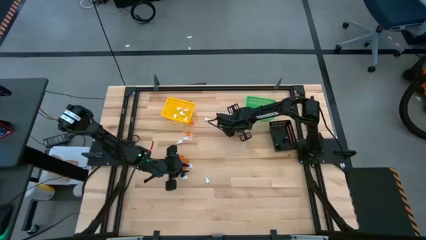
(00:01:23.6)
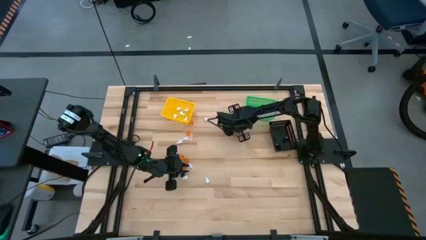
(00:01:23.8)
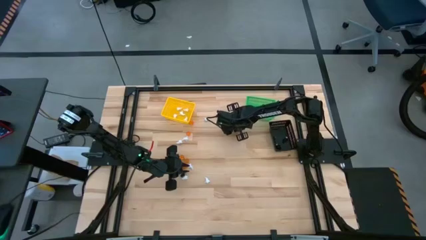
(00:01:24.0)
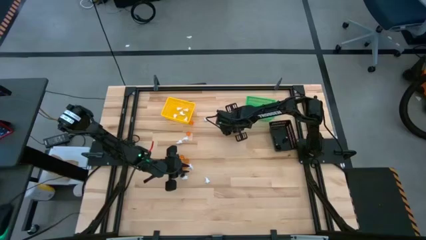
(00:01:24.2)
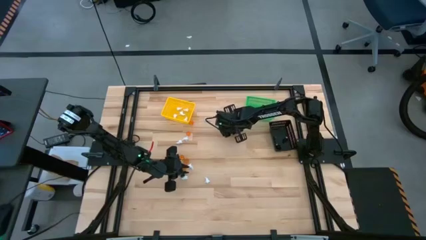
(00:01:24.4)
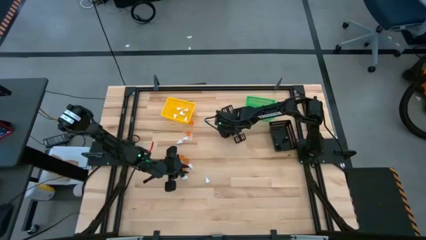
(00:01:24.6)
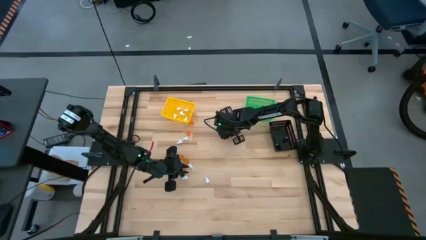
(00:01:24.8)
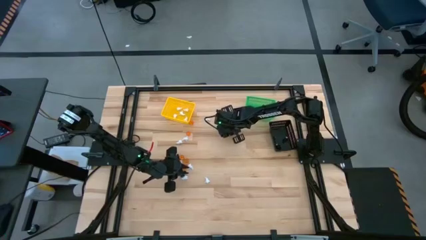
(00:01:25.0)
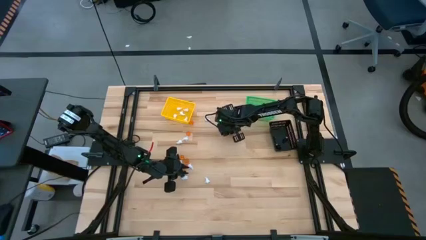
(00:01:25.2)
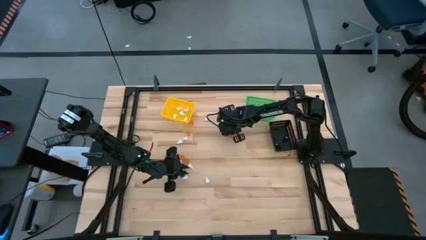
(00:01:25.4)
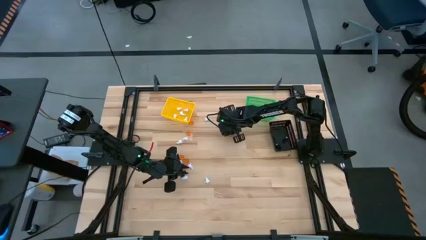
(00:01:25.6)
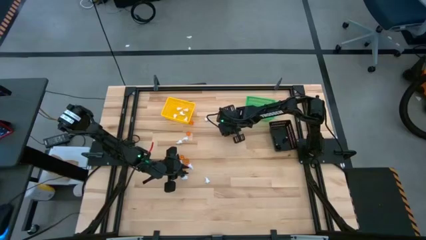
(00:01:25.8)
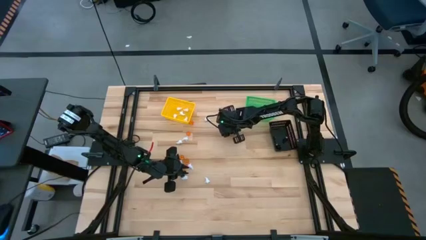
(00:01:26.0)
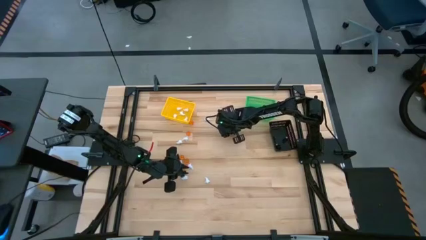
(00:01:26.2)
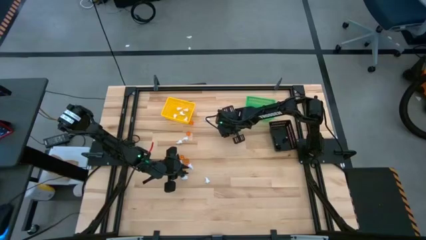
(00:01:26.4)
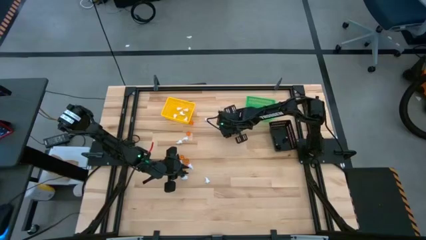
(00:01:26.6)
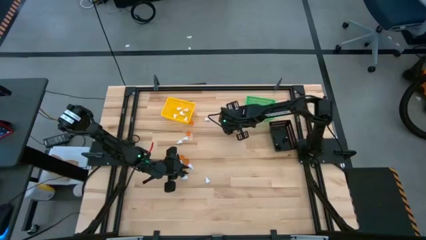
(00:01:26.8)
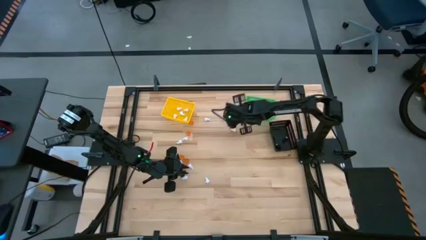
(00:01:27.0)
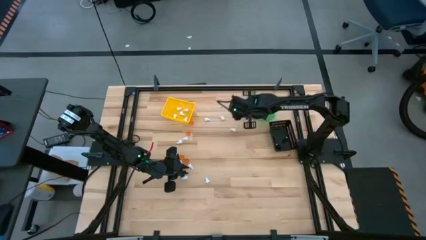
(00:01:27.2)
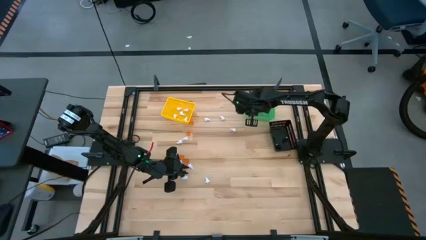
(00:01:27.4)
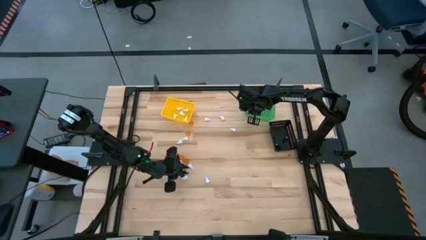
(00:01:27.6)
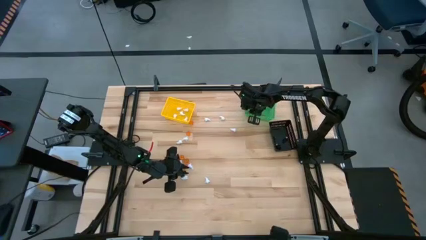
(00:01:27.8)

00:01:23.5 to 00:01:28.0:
Task: Sort Halloween decoration
Put the orange pumpkin toy into the green bin

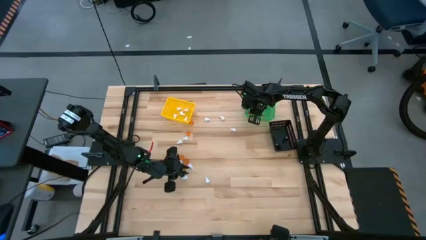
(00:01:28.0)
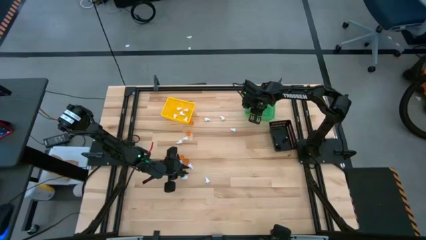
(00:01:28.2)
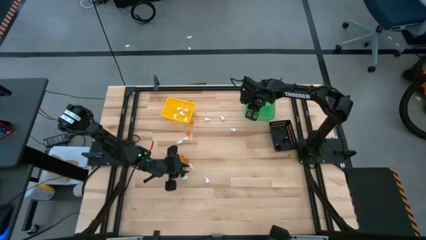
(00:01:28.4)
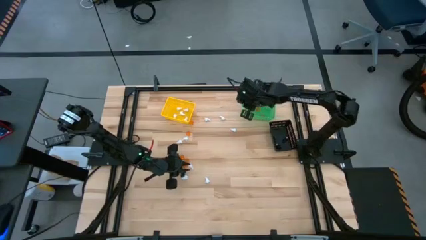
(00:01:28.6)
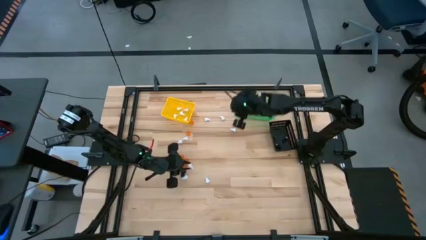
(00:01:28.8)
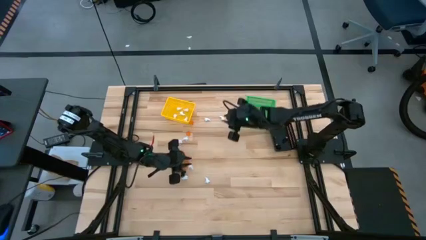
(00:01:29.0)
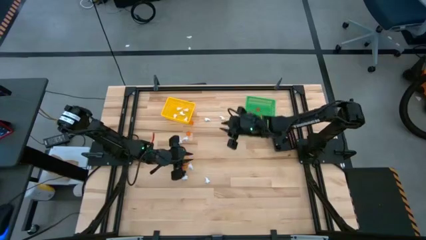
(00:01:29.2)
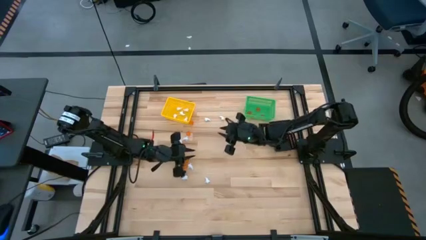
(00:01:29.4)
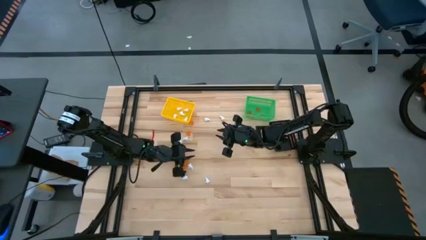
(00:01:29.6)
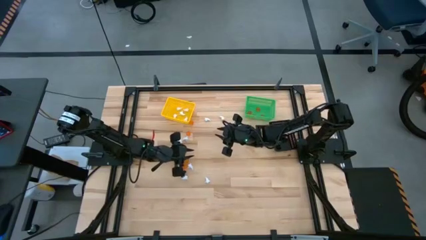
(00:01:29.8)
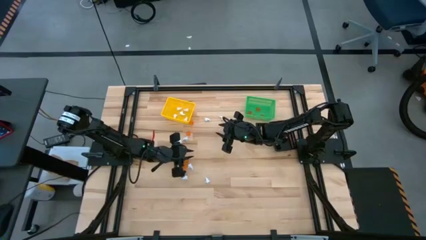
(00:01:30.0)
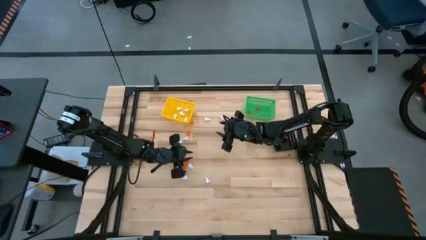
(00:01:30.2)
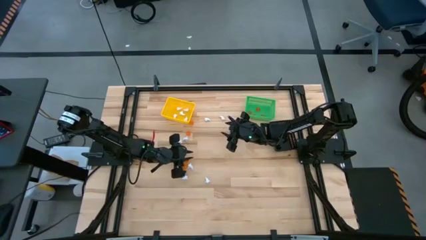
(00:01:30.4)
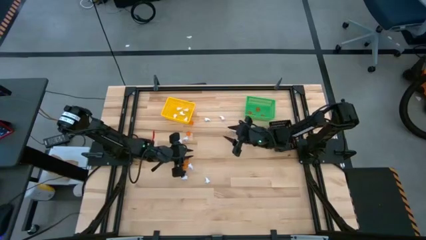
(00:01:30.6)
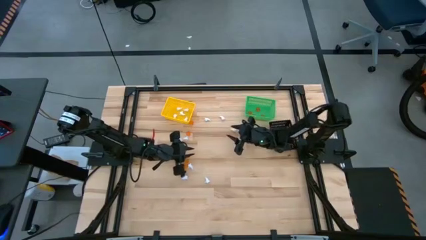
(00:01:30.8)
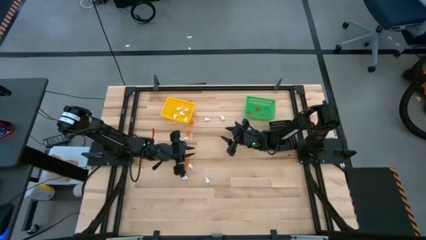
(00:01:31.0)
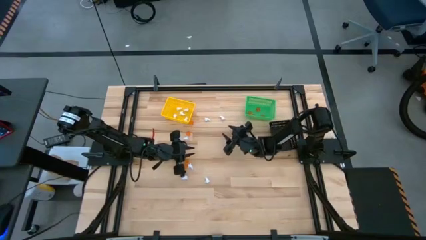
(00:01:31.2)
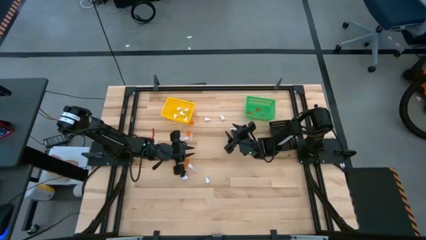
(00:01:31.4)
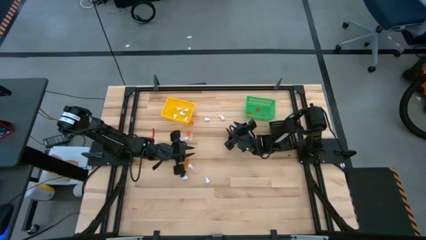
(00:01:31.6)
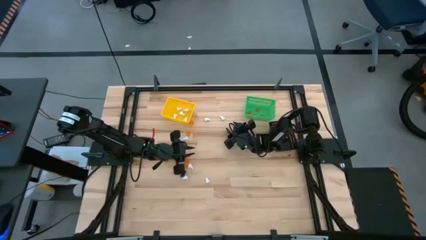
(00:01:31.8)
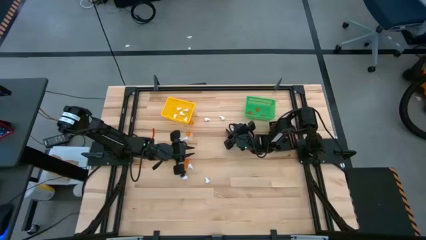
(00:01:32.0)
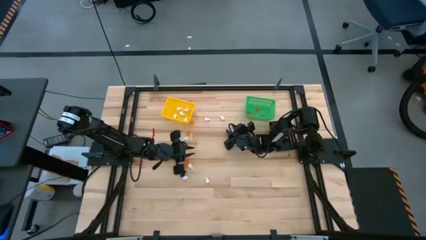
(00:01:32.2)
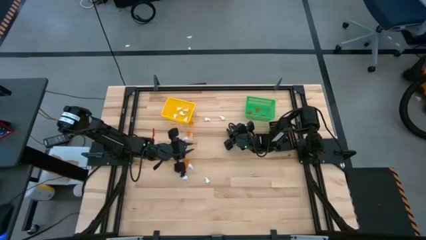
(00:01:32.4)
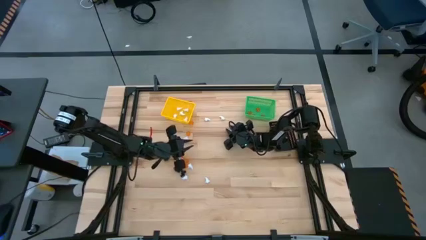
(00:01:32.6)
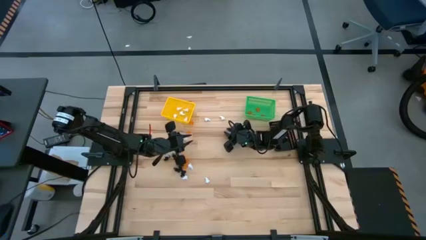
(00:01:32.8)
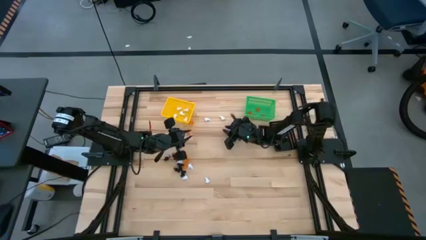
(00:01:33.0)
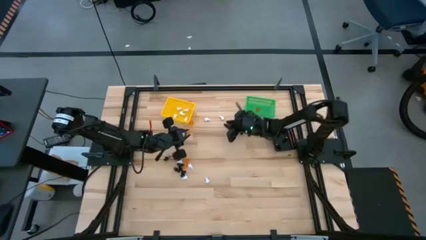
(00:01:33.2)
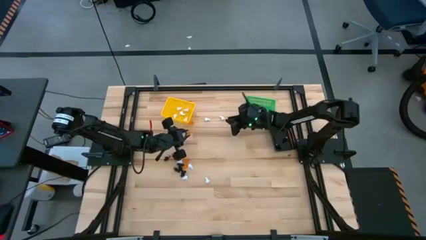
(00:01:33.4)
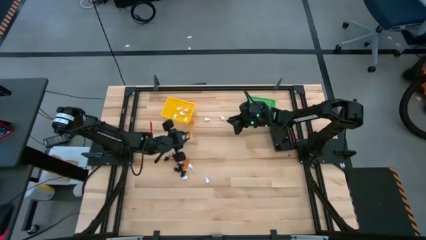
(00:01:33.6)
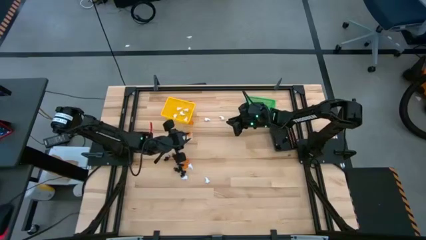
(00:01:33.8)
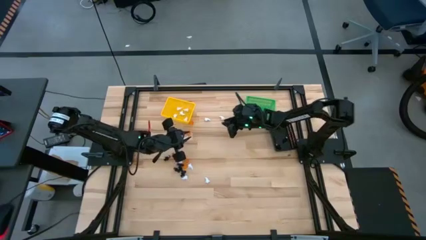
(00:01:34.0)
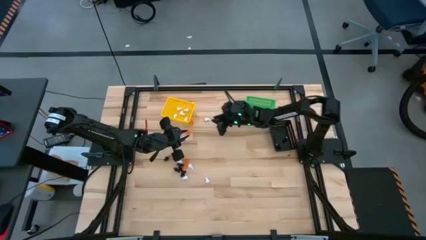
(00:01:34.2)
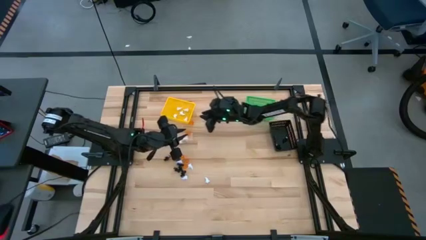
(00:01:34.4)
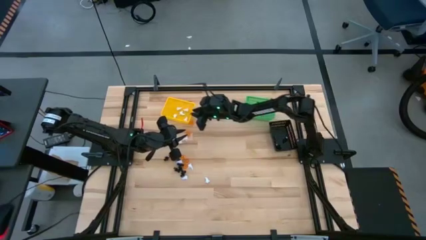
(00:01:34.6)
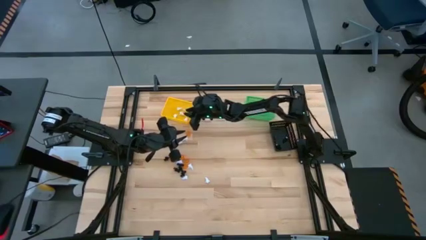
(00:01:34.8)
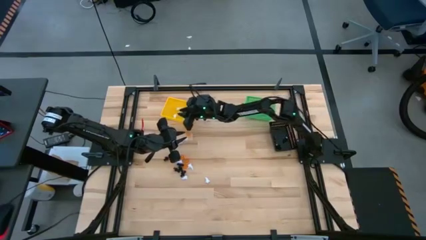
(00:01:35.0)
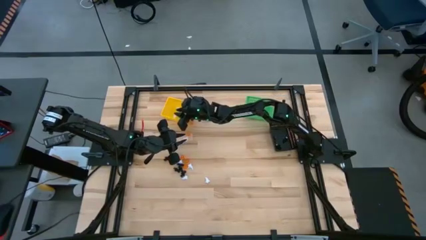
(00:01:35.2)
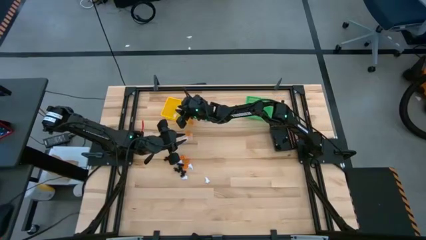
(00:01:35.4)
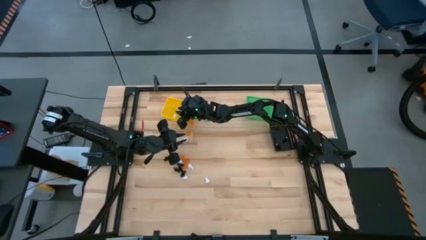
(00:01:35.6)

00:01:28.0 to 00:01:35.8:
Put the white ghost toy into the yellow bin

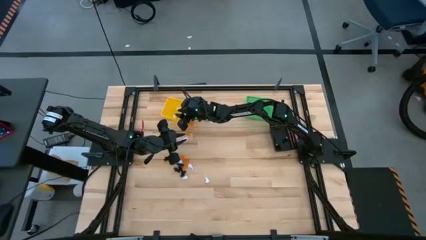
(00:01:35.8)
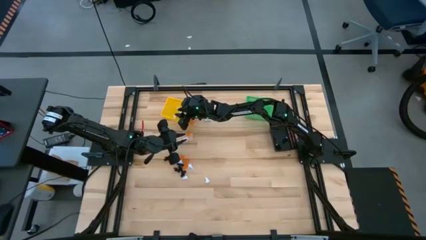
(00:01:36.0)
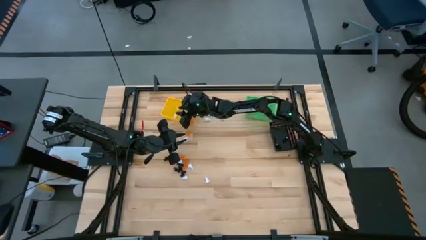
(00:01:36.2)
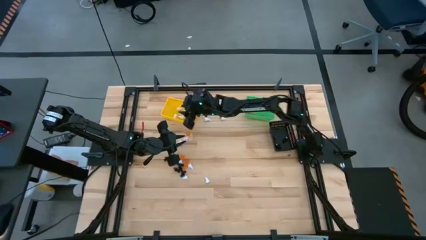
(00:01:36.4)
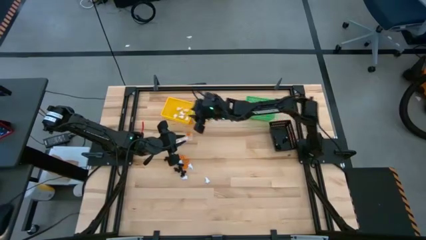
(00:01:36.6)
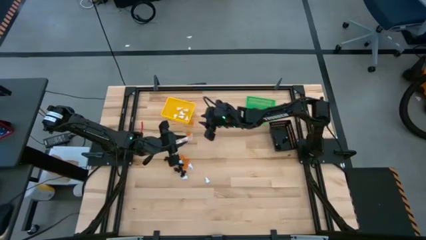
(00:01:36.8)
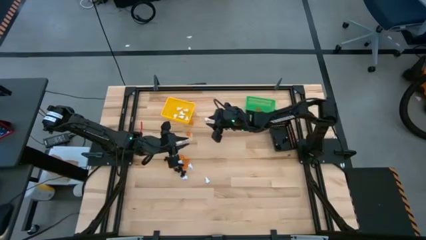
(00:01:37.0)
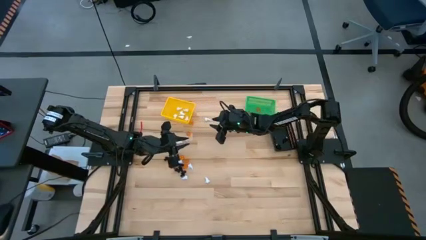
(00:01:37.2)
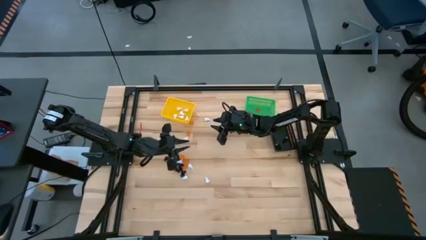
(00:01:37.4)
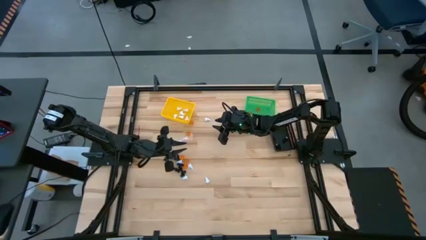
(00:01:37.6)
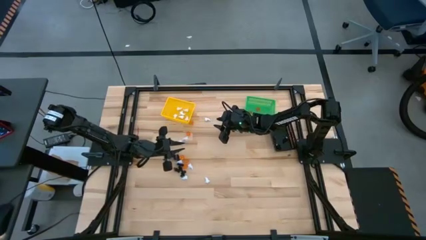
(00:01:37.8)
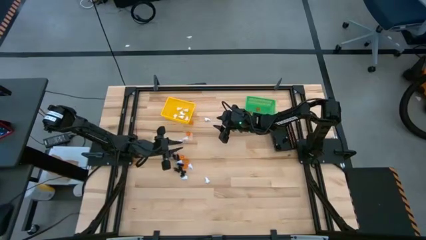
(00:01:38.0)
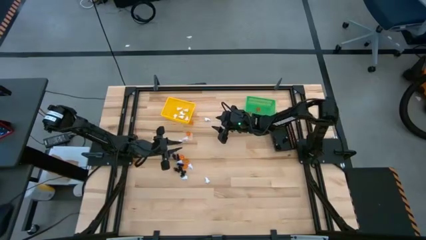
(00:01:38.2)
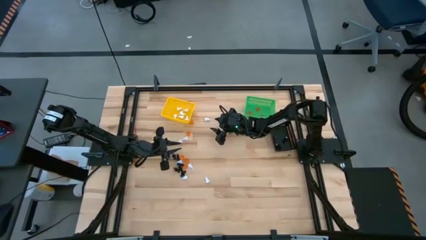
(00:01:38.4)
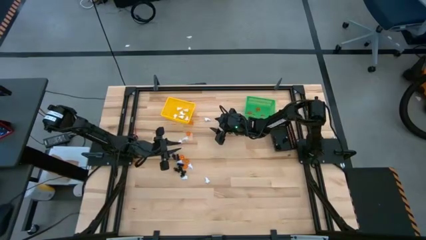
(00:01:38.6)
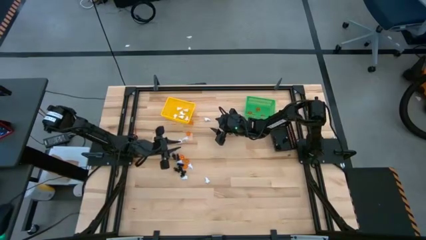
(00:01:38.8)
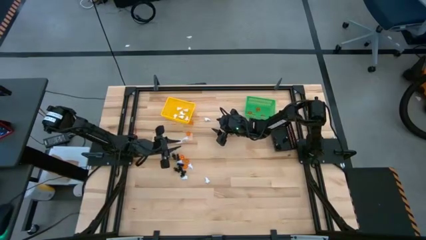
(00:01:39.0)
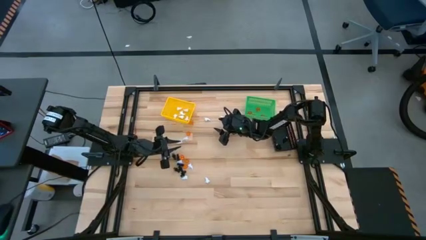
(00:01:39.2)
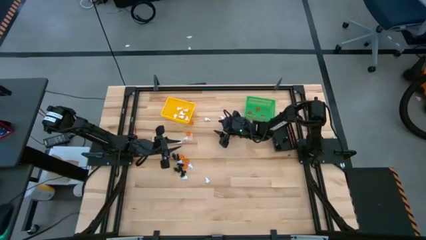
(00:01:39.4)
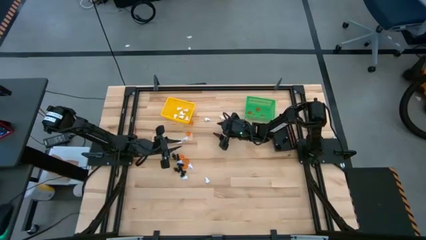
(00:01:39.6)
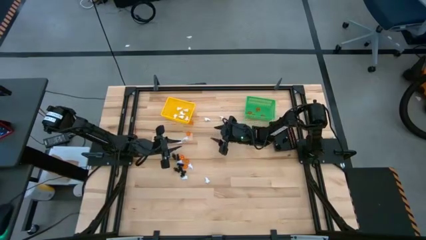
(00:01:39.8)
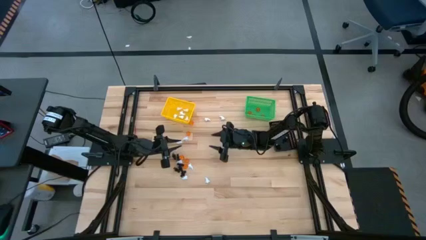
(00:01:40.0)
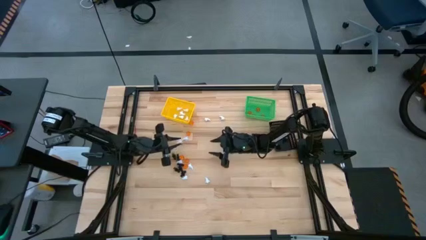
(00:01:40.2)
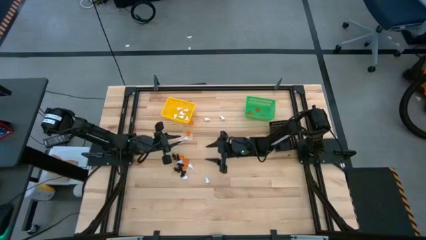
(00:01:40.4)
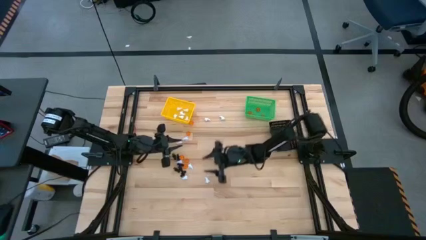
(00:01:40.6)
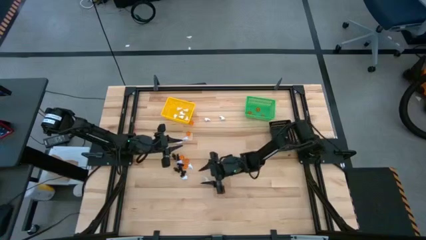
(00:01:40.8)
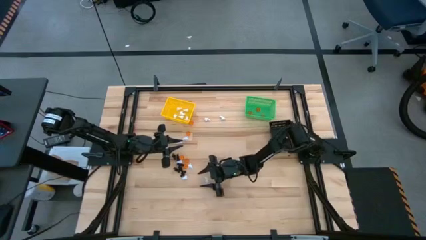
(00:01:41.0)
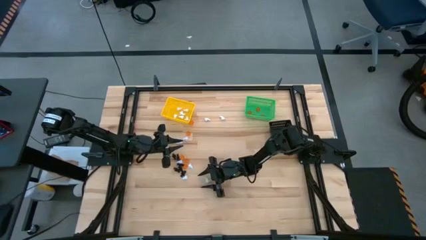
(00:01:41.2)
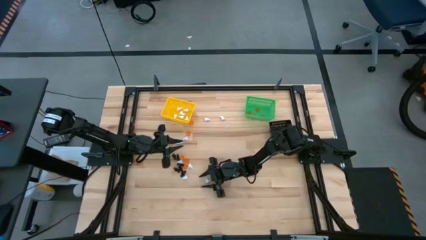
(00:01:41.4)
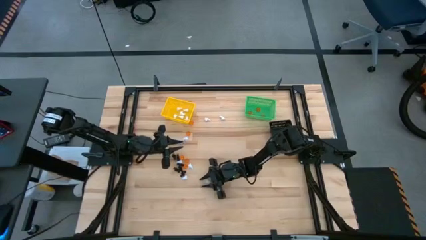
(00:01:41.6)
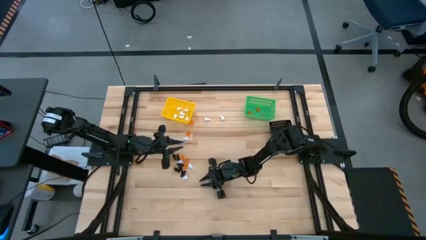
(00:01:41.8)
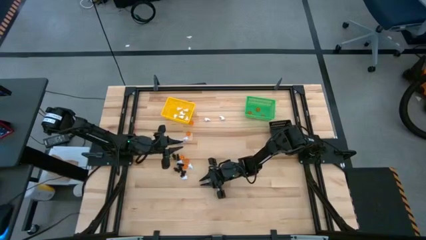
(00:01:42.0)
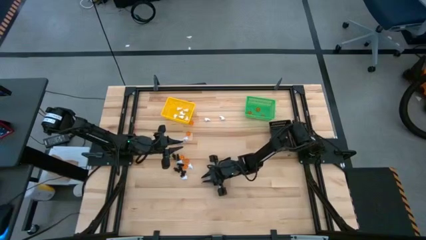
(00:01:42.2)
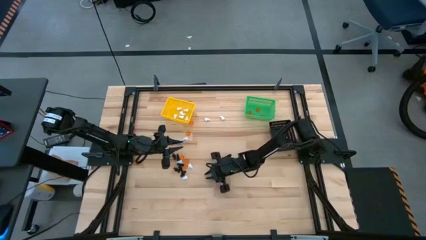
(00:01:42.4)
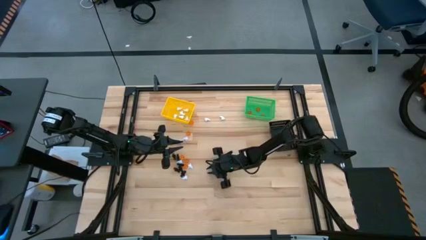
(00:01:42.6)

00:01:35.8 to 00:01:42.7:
Put the white ghost toy into the yellow bin
